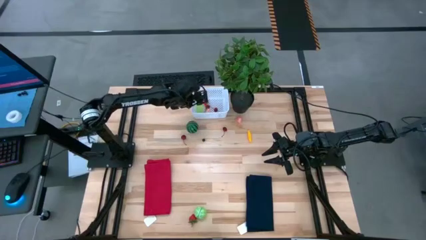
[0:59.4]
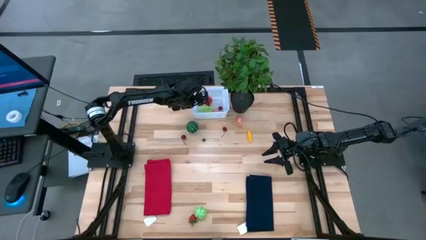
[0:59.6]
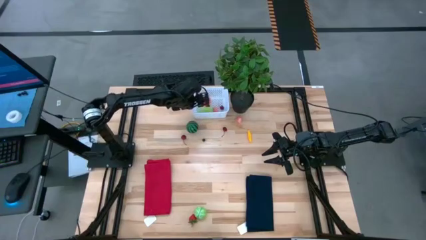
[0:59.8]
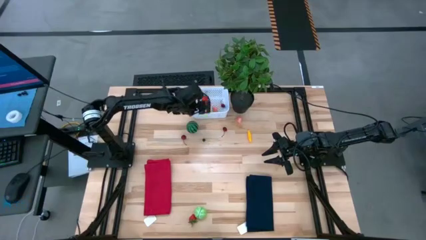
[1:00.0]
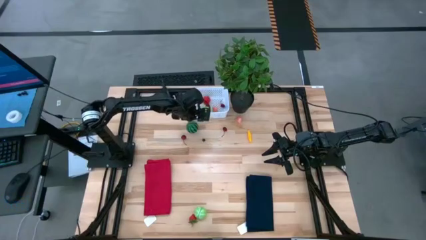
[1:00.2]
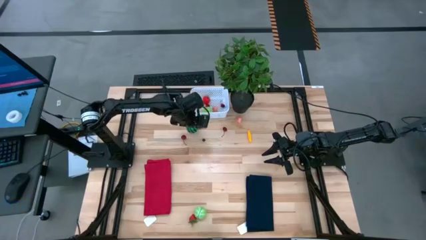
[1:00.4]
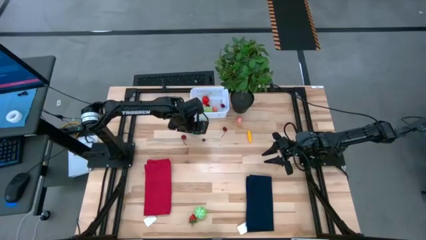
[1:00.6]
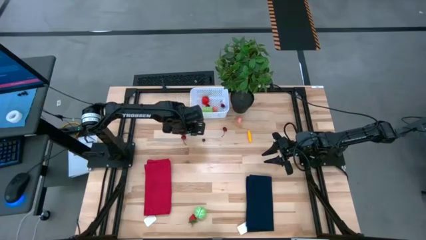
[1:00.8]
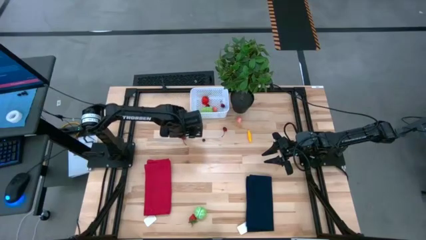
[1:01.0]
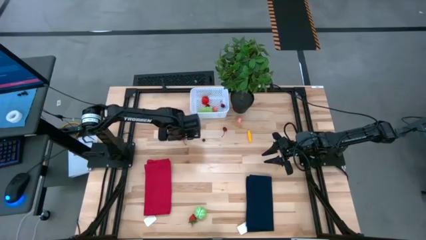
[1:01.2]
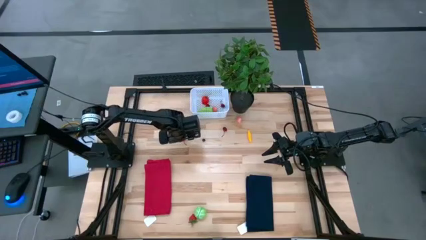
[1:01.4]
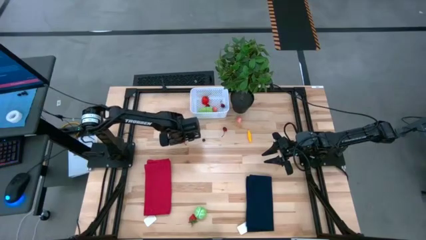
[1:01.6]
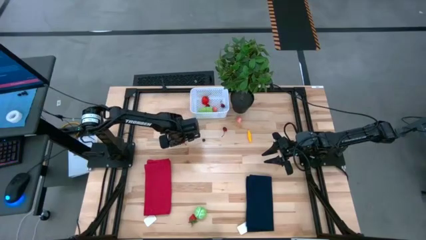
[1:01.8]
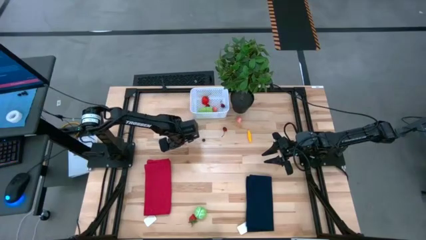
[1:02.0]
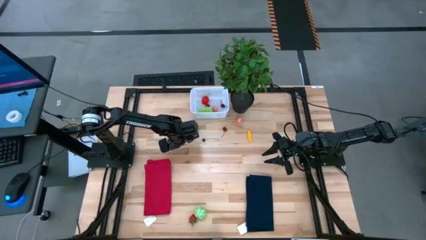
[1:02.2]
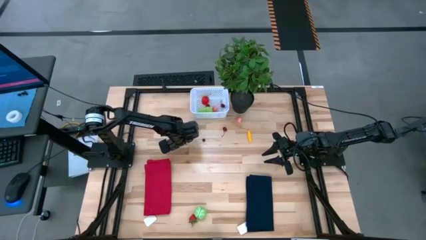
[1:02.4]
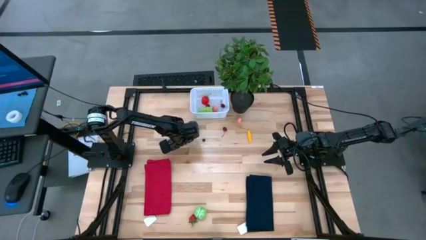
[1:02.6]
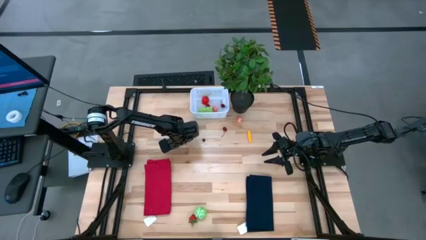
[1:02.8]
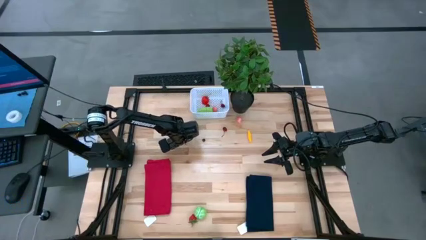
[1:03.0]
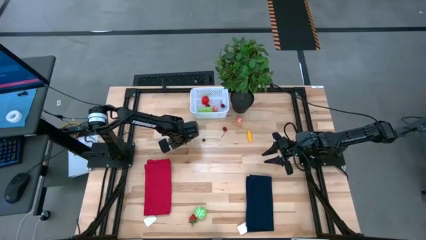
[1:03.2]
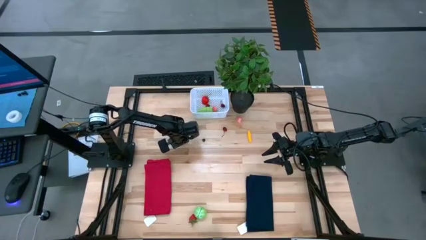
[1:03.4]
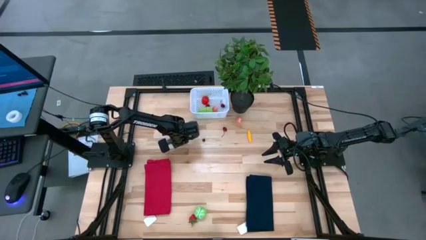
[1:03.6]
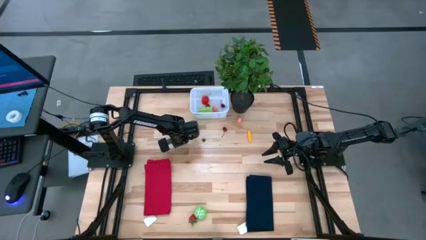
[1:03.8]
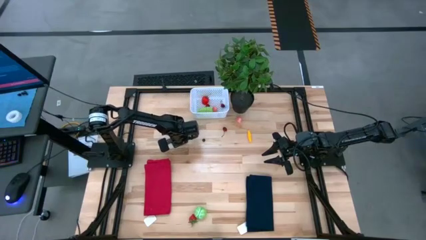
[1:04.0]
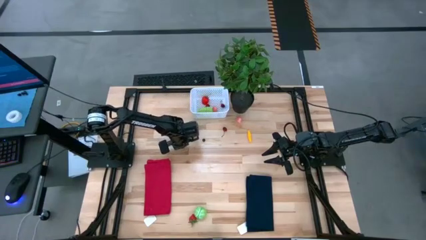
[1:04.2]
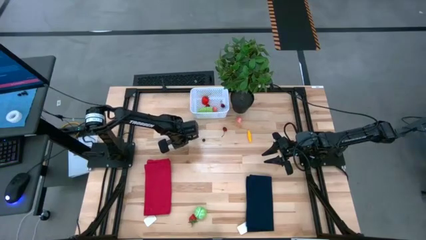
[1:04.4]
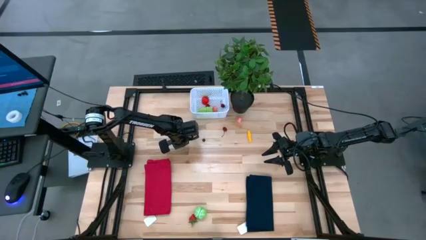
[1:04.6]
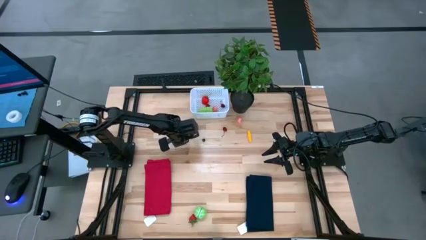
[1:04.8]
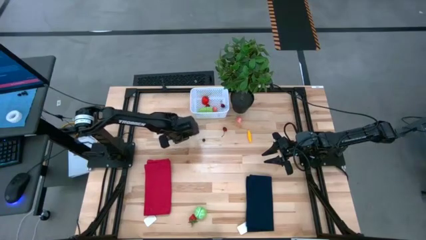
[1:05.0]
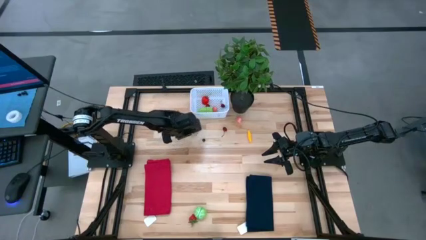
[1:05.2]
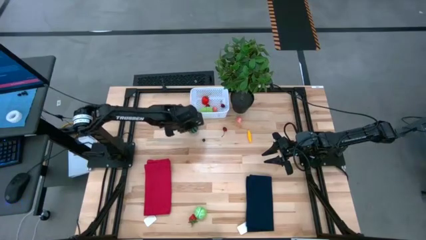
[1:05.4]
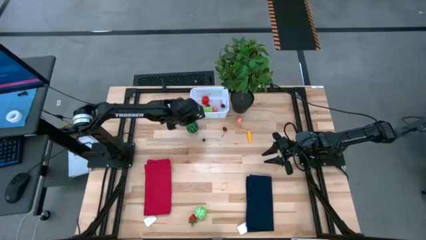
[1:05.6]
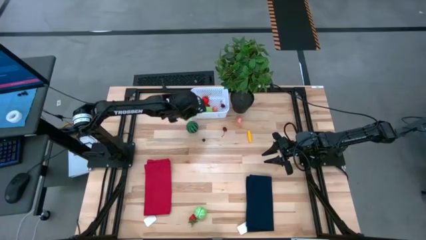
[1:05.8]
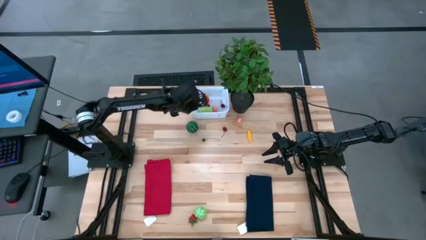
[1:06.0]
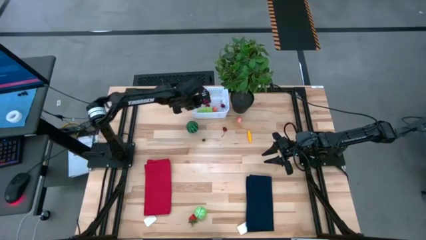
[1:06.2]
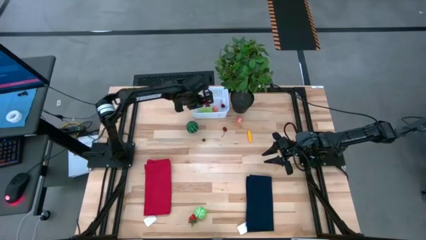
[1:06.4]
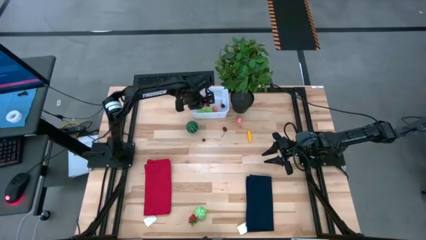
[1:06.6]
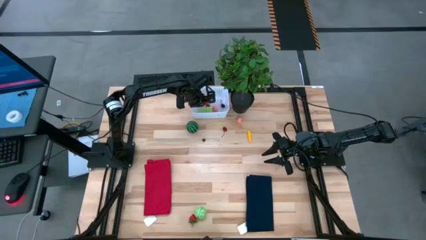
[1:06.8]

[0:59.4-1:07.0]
Task: Pick and placing Produce into tupperware
Put the red cherry into the white basket

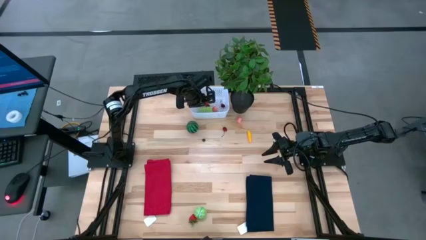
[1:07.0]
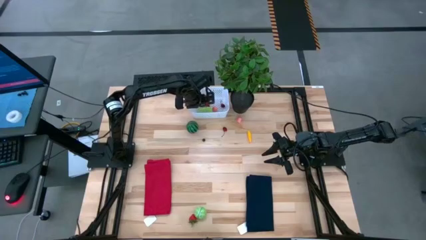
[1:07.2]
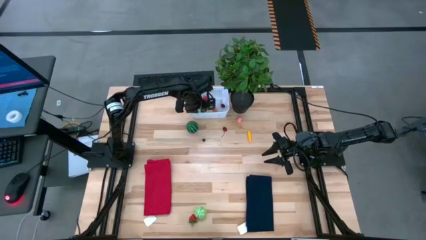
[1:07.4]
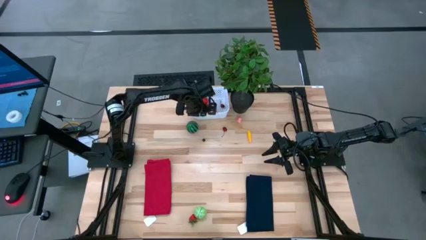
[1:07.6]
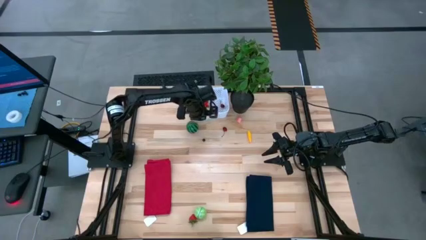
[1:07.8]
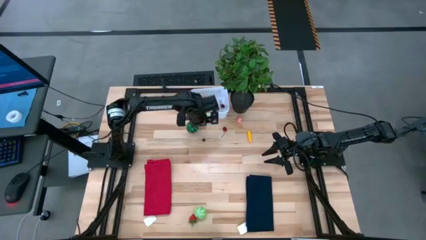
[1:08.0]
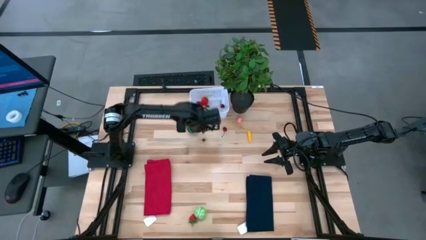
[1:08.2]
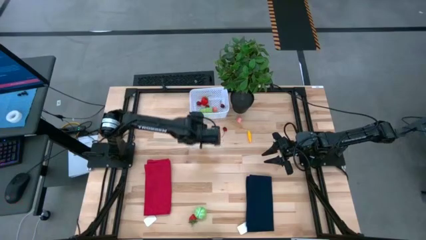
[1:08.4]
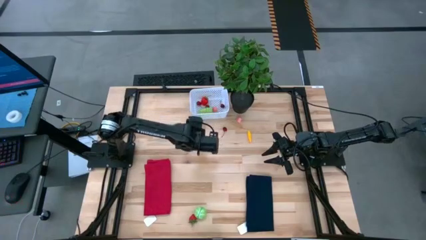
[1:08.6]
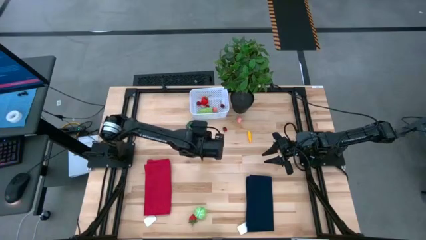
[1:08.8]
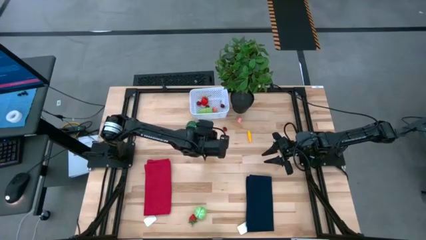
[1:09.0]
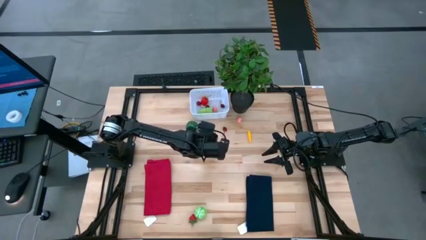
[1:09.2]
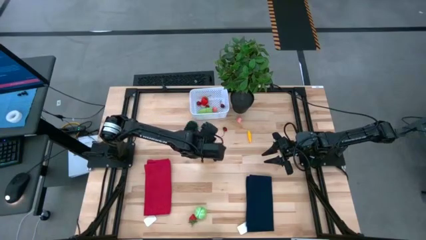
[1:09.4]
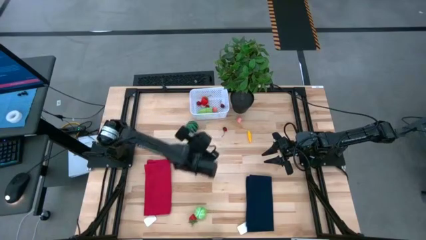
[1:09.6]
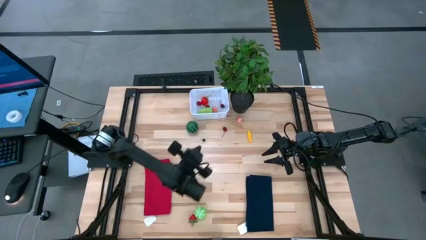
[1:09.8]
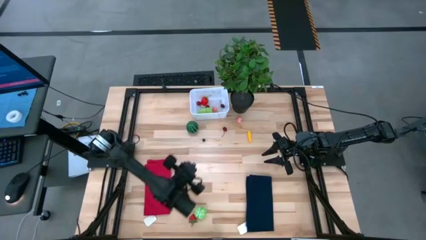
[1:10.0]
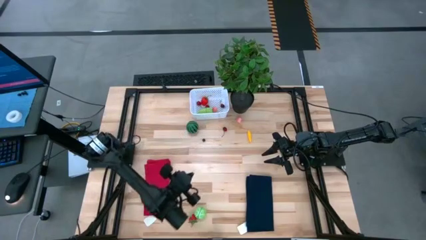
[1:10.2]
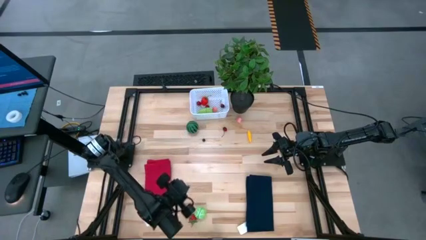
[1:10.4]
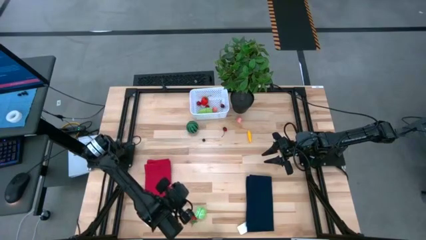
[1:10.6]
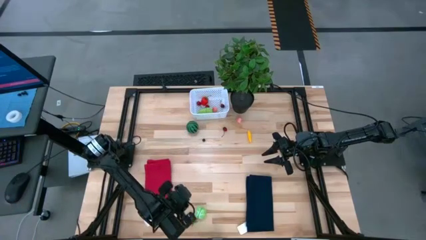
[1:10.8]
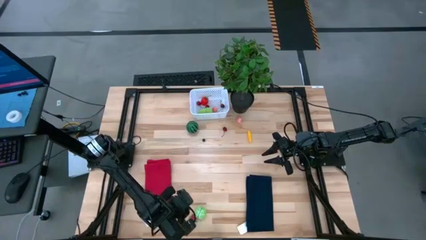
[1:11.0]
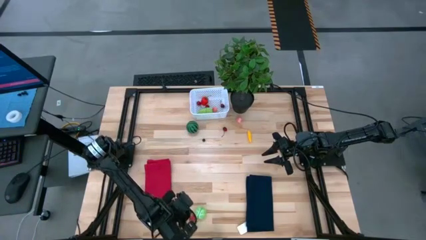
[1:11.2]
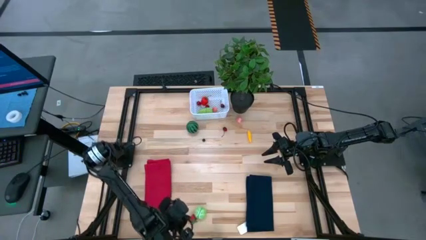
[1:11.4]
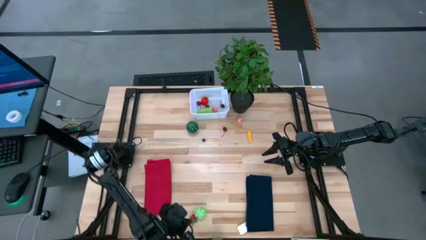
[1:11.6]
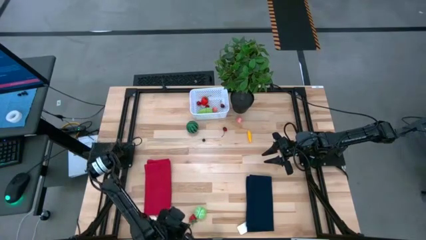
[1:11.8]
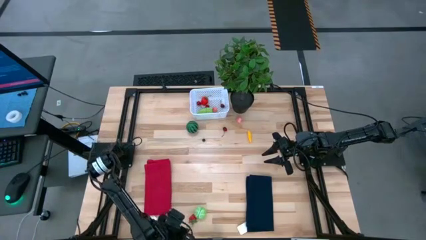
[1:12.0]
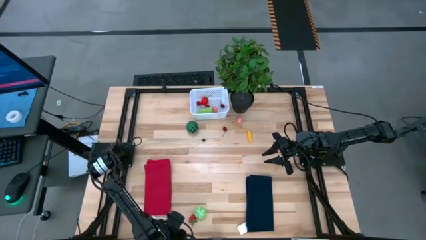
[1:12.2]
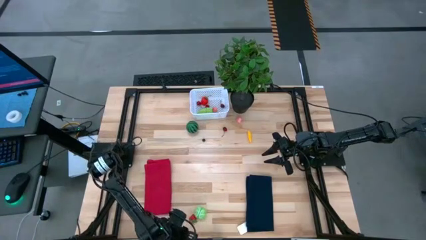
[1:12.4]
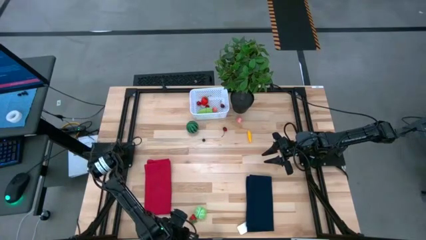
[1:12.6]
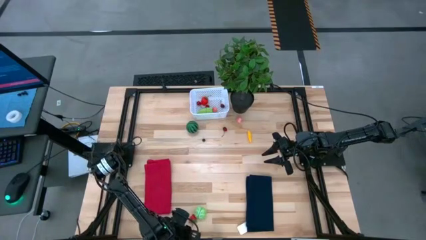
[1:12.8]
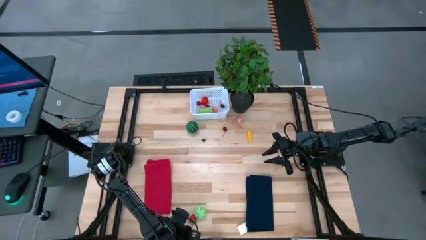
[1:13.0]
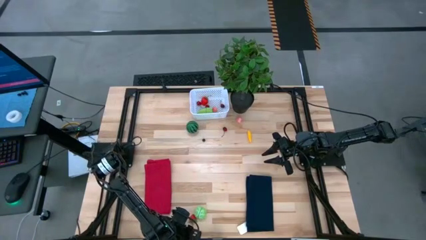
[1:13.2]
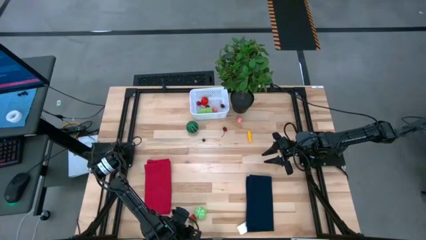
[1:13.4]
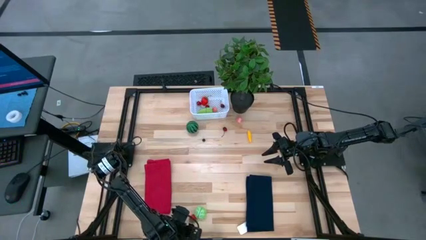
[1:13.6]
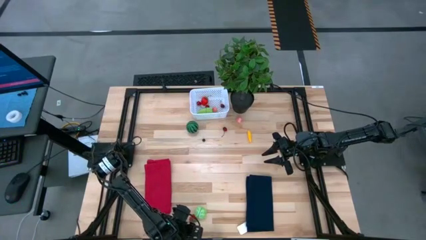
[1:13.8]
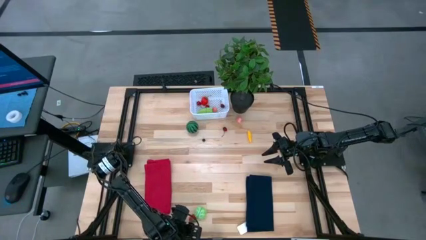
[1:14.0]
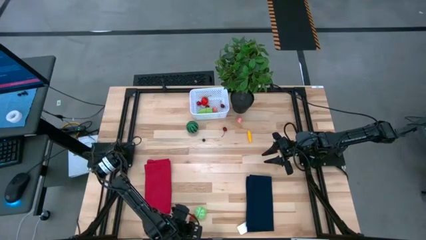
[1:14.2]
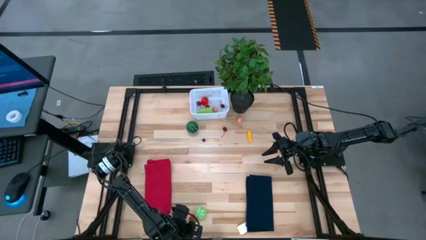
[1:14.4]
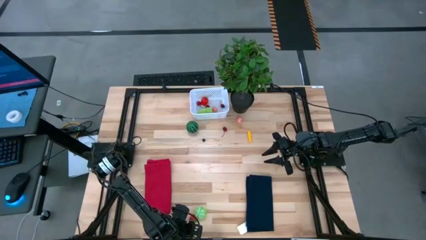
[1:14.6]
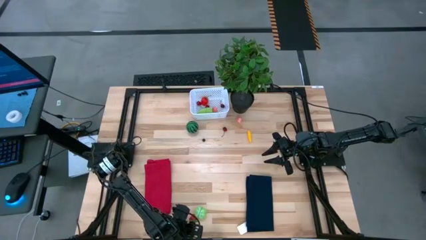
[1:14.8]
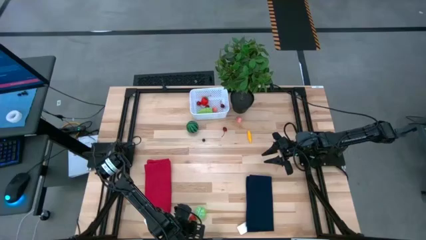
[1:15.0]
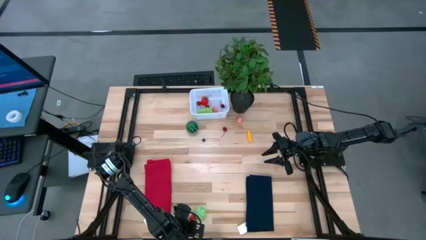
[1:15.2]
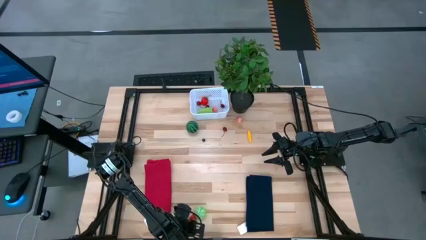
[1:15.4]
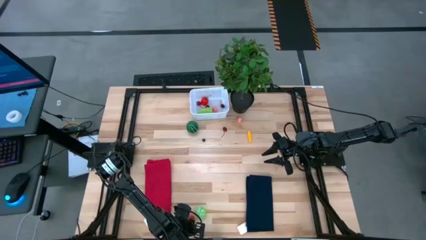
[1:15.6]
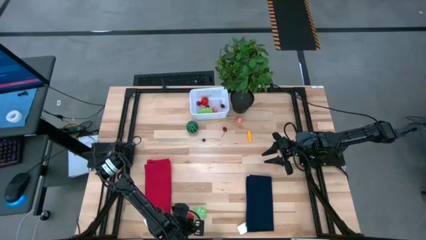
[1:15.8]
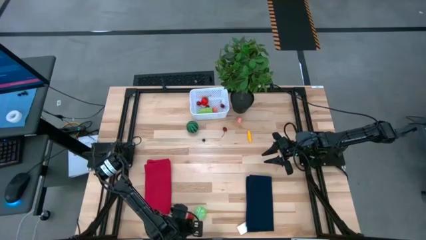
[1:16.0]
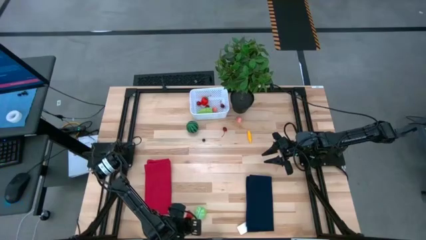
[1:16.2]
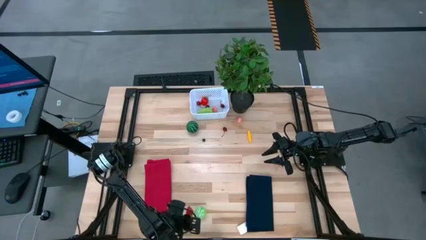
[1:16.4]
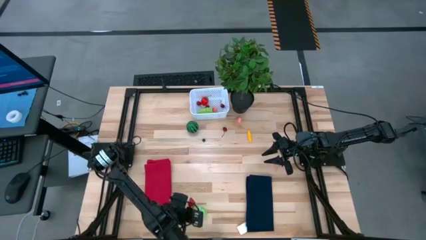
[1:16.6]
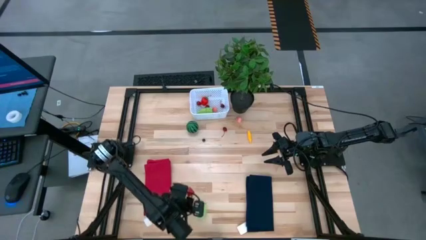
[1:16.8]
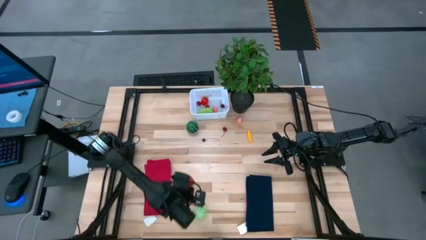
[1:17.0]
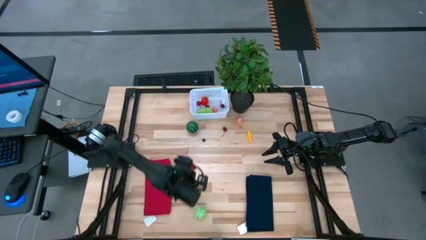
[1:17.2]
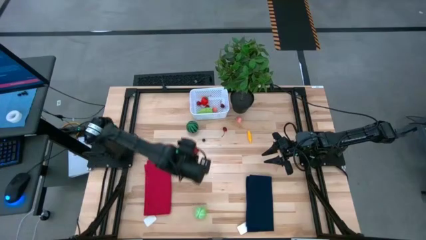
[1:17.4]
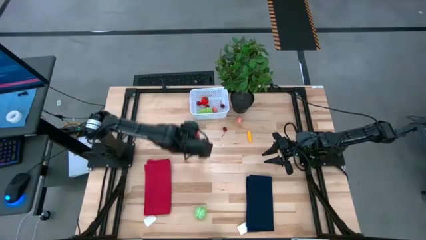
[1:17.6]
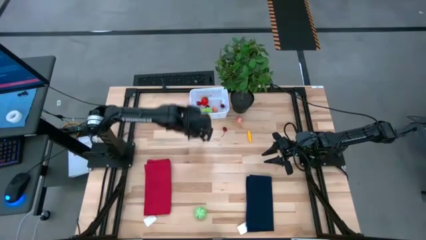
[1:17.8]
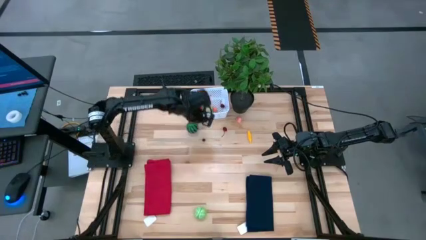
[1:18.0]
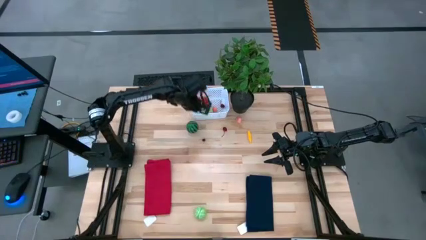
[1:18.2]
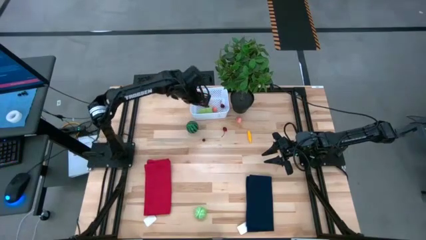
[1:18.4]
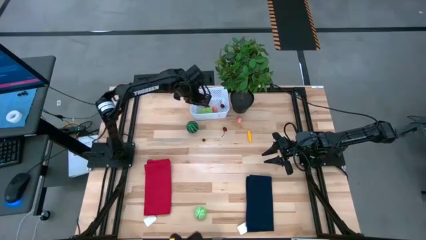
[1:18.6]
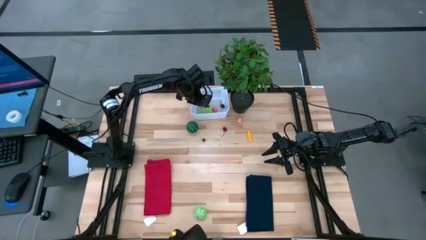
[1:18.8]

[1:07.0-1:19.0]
Put the red strawberry into the white basket
